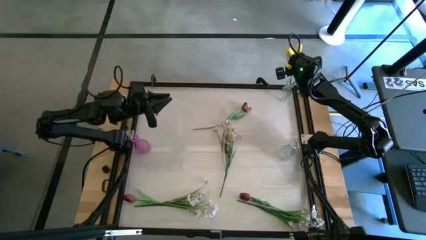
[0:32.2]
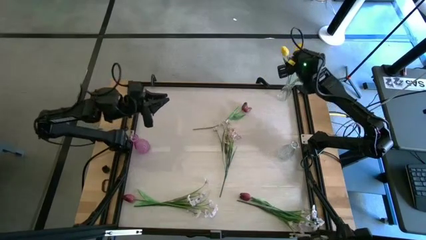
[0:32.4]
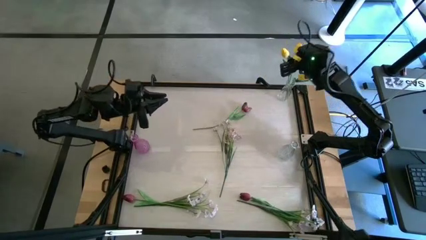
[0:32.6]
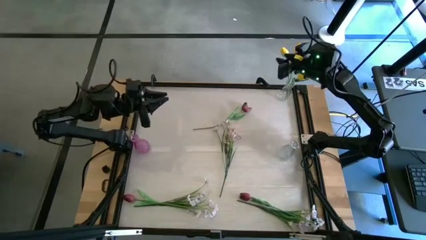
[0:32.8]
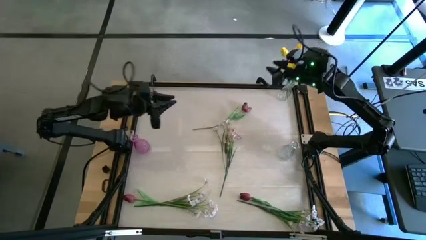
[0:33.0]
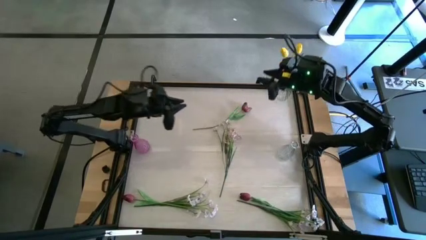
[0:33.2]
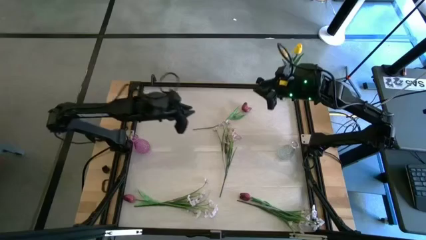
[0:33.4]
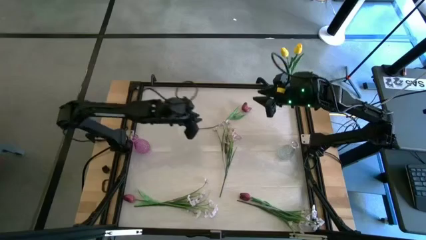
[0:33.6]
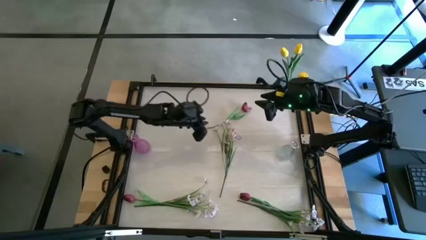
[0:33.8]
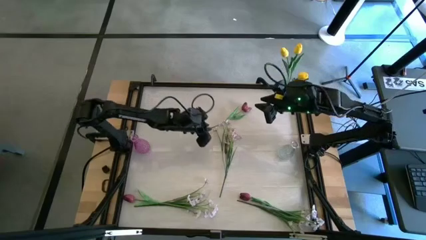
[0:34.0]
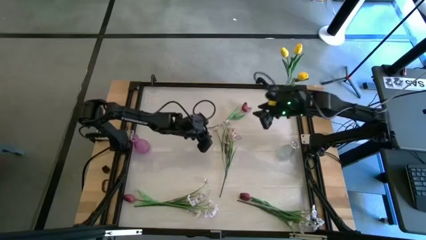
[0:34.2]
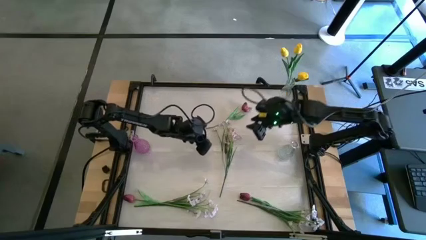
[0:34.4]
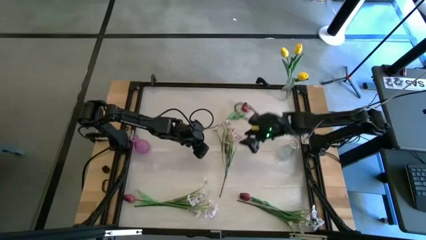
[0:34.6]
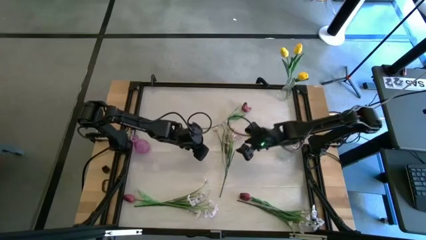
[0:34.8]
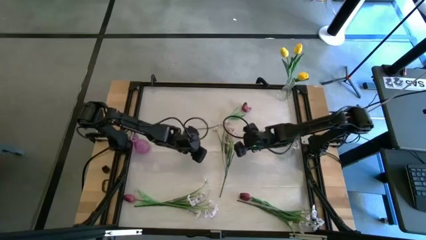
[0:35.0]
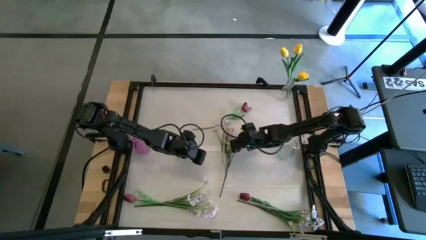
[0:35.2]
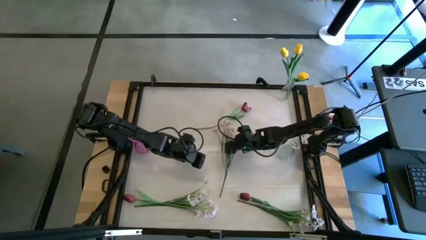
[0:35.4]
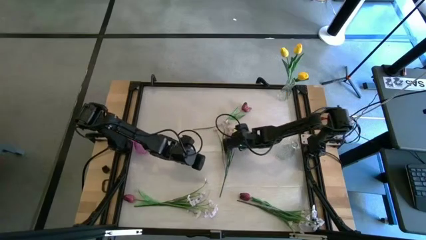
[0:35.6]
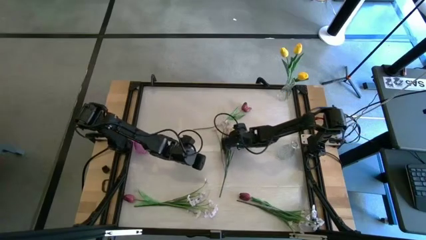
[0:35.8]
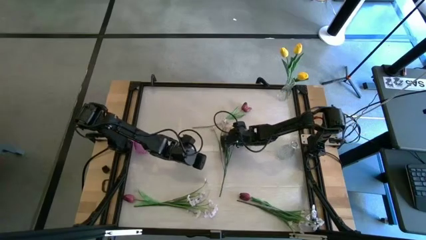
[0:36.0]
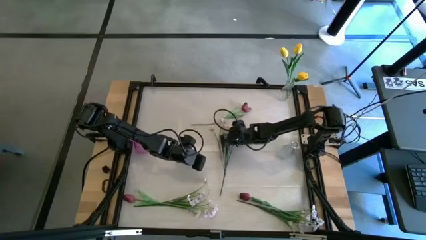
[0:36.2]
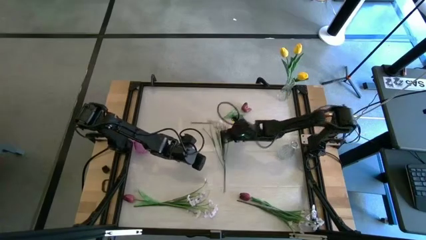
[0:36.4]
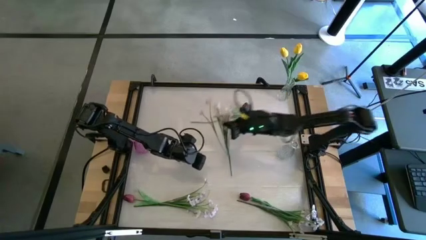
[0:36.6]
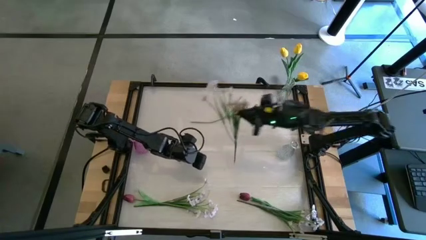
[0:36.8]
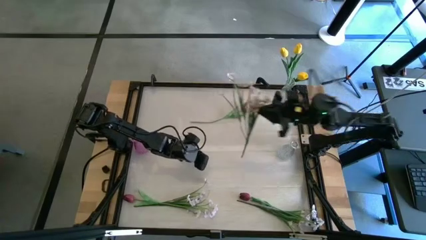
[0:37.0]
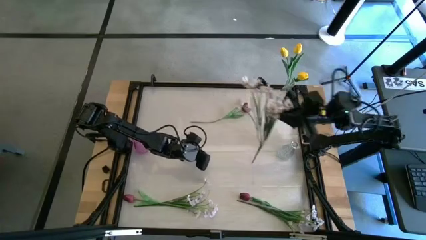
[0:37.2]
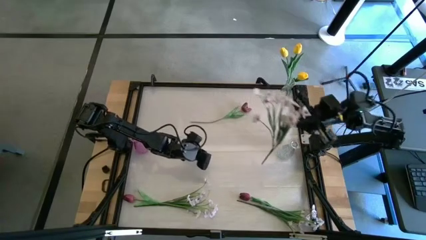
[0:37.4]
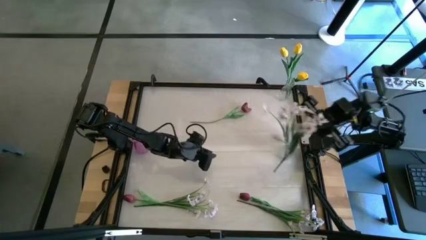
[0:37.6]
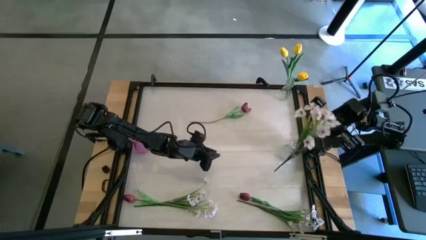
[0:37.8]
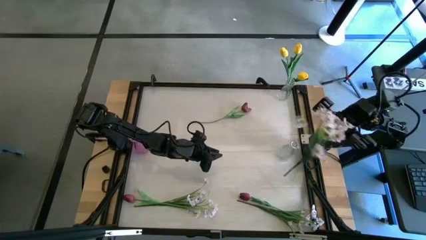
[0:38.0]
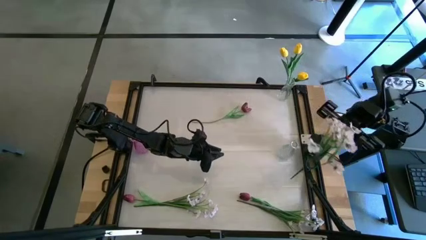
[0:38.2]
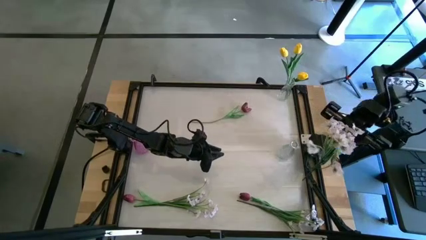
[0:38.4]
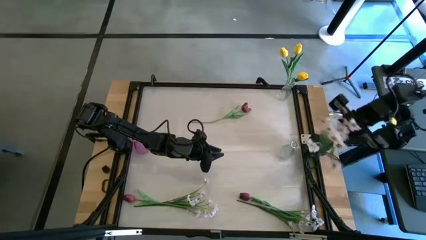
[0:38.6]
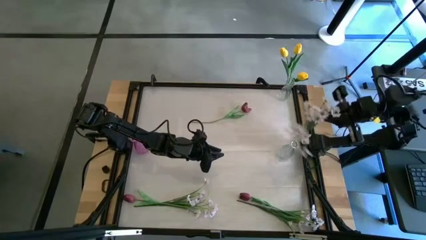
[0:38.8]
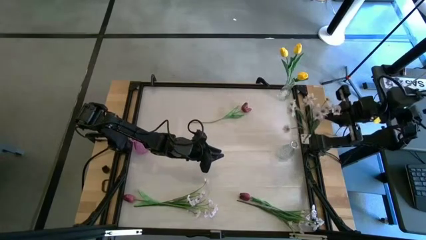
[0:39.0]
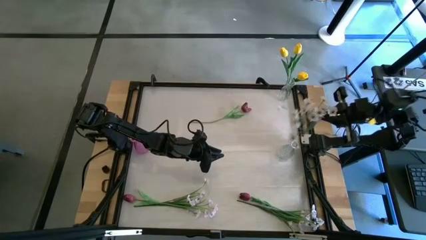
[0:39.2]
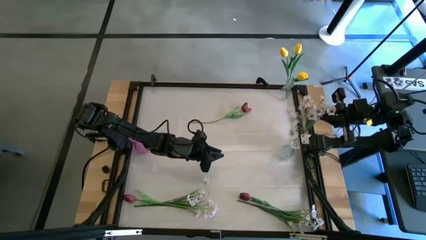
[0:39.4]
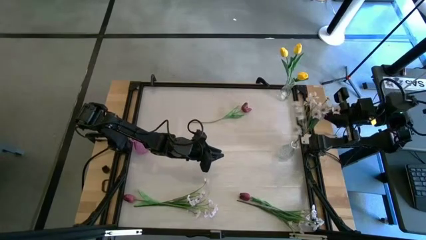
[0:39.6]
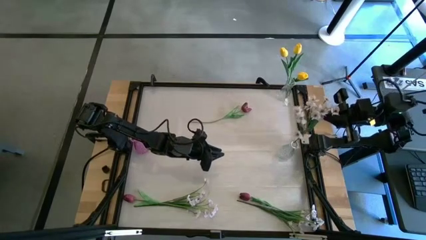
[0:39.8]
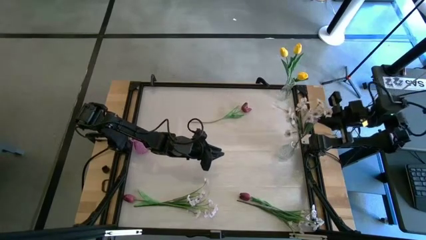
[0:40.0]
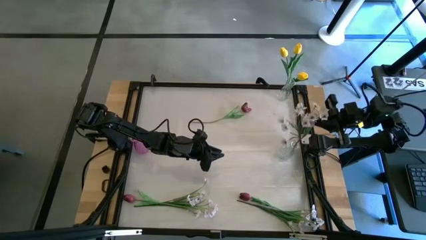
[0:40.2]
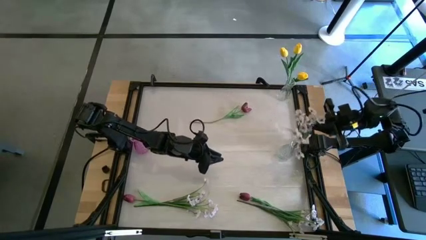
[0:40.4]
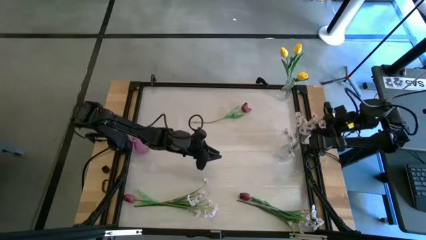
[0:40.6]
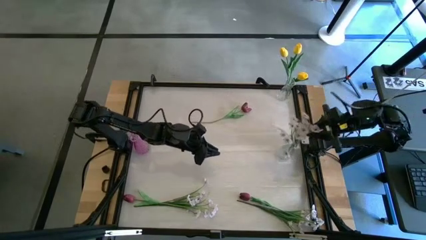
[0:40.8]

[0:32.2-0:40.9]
Task: Sort flowers into vase by color
Put the top white flowers into the bottom transparent vase

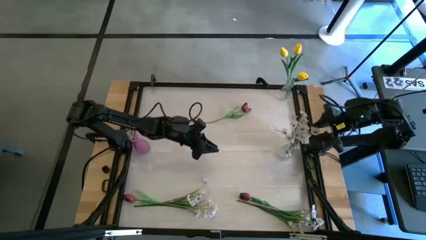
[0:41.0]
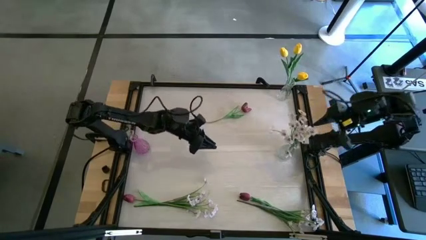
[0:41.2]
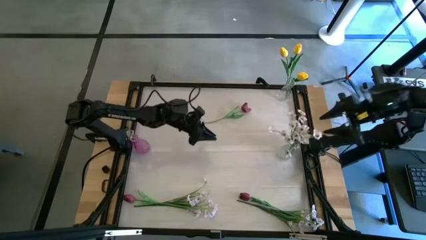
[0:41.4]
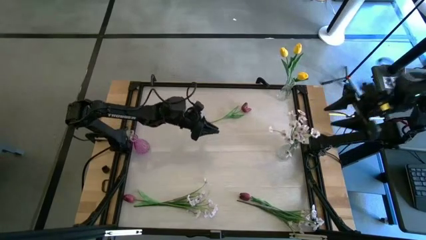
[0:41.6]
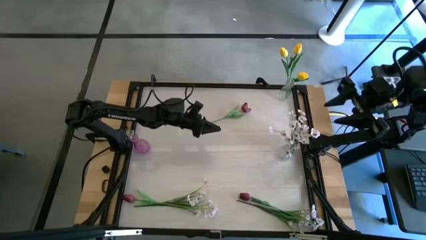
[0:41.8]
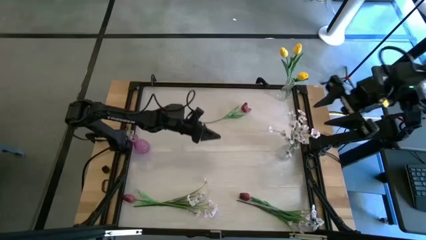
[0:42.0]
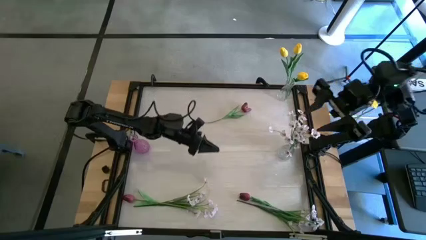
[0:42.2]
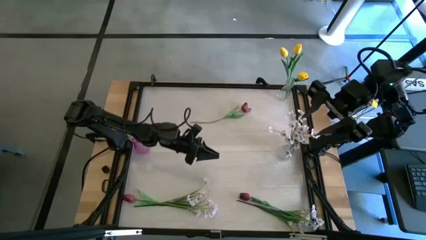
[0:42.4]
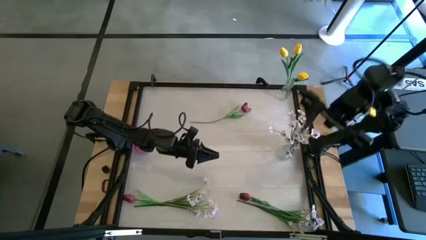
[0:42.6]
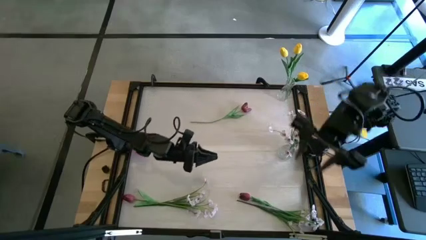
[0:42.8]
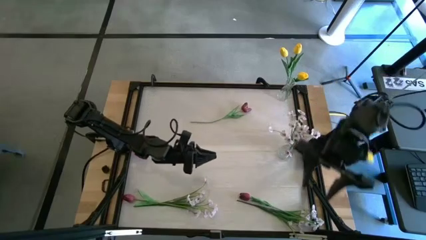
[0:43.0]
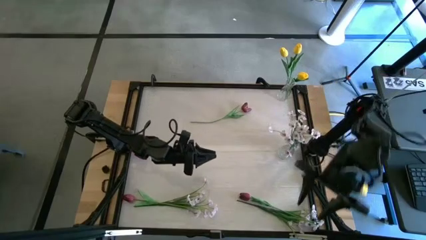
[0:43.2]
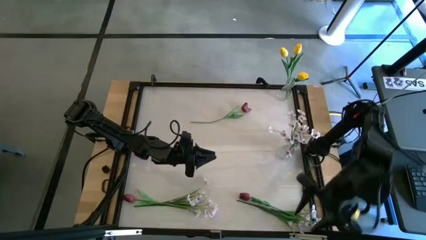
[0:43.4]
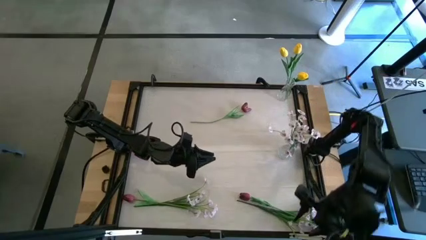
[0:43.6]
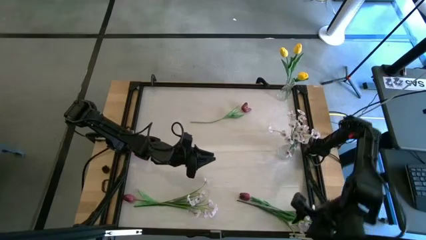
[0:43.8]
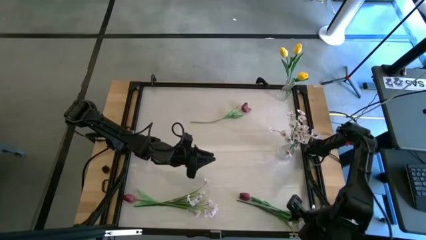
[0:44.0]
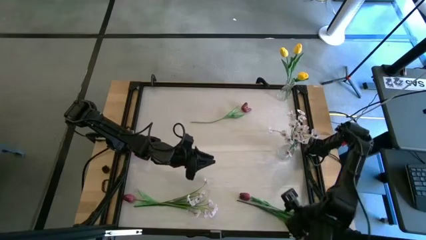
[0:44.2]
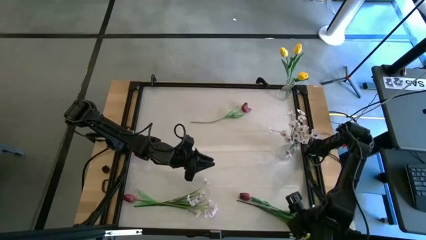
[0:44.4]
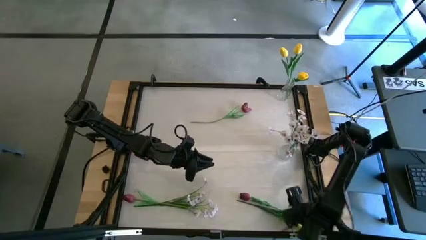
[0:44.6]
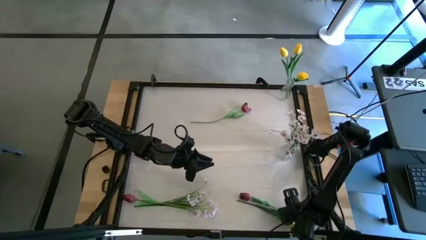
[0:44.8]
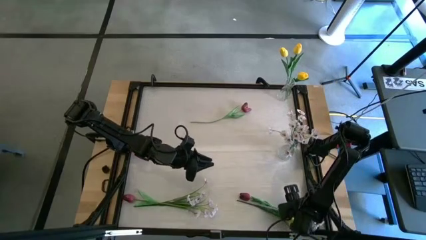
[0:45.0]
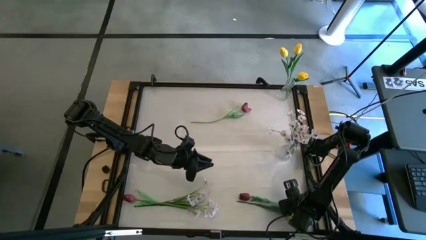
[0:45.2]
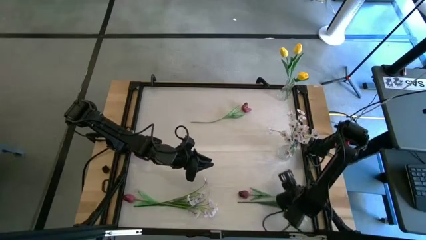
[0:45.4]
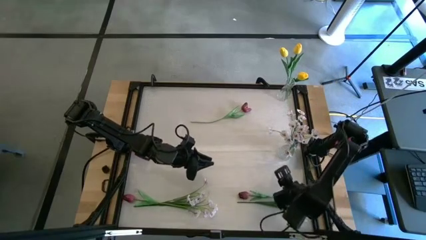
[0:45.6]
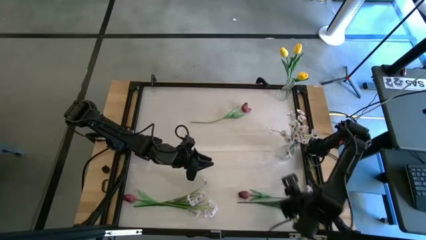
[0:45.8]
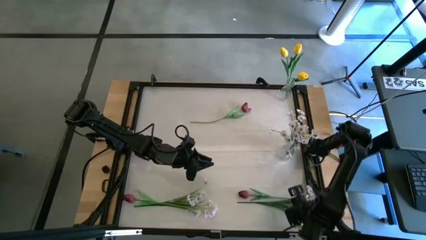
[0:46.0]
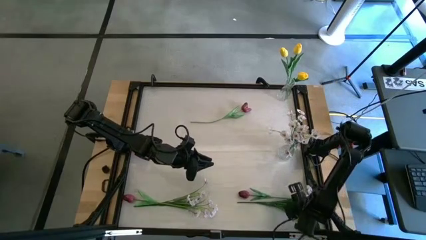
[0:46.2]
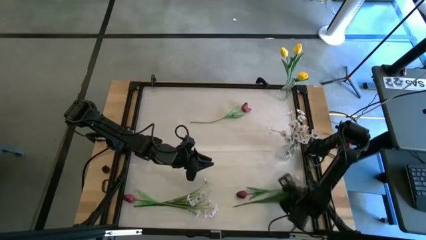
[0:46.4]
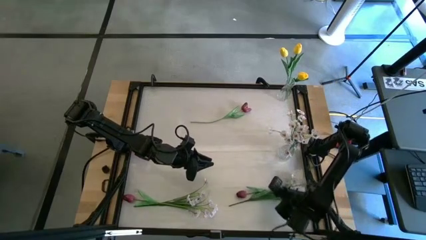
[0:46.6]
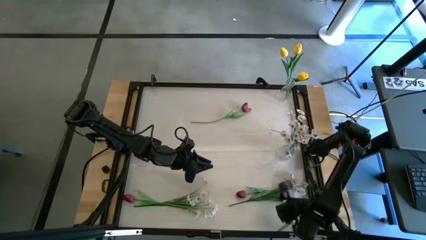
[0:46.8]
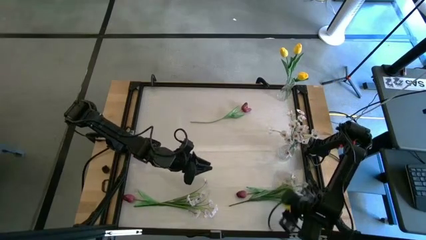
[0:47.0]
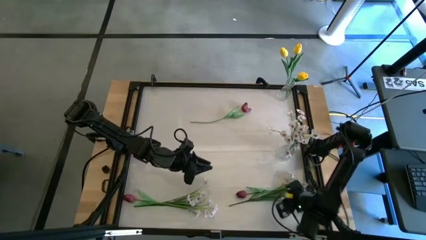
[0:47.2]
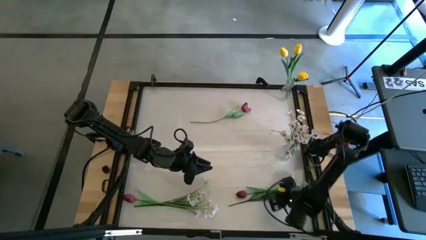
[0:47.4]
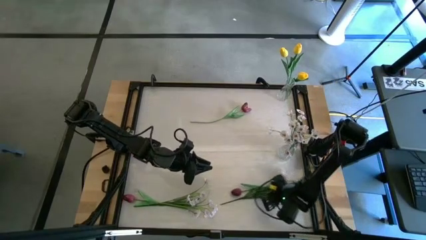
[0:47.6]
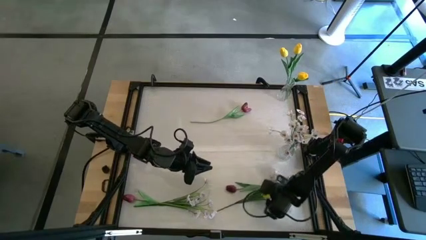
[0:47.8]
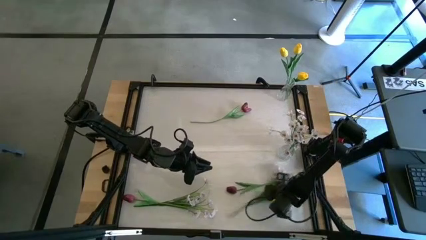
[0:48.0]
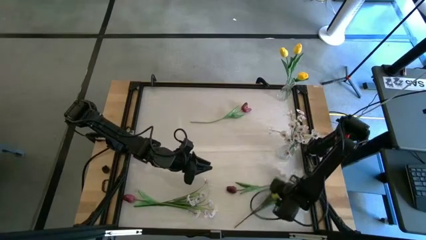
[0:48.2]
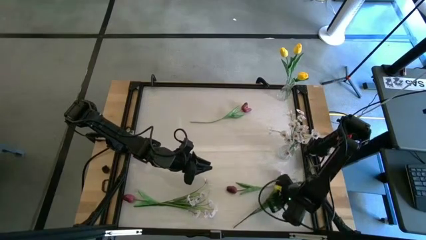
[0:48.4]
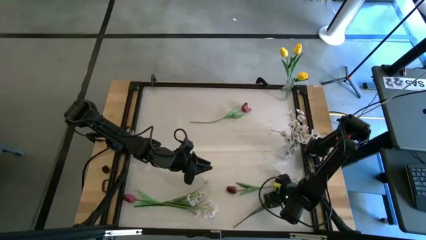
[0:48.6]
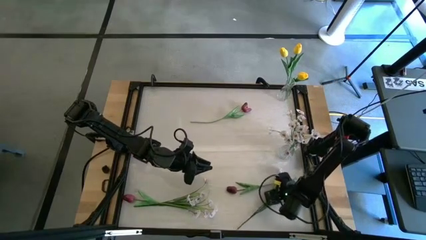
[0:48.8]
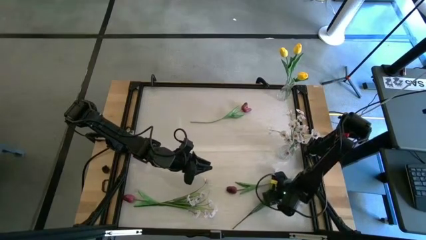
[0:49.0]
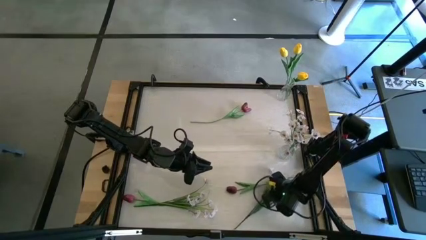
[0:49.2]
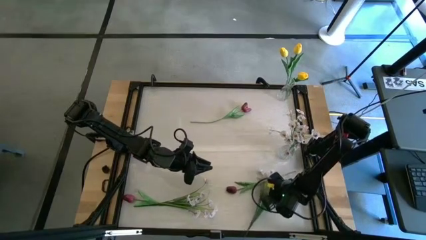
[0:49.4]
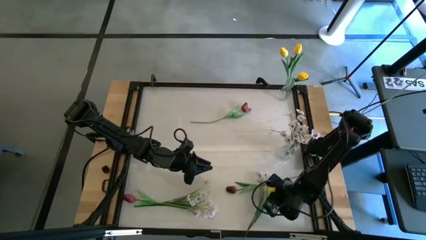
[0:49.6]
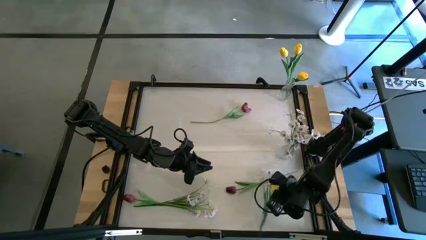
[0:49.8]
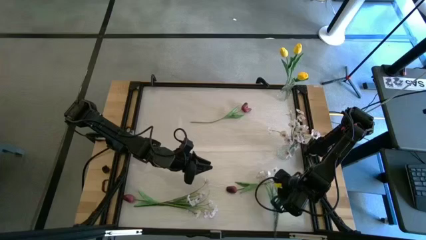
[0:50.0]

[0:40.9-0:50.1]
Put the right white flowers into the bottom transparent vase
